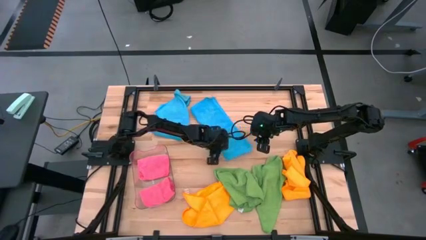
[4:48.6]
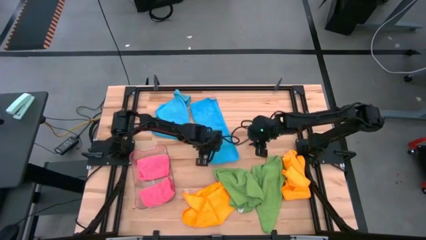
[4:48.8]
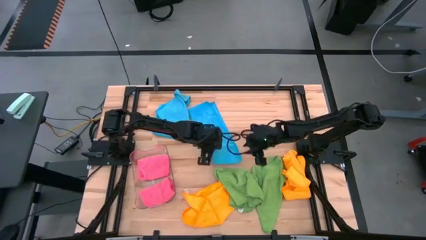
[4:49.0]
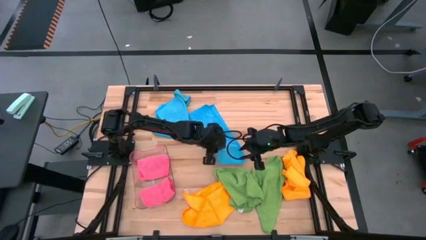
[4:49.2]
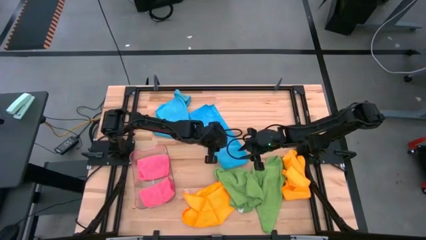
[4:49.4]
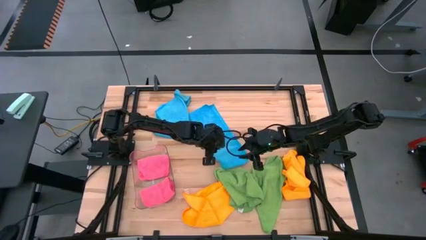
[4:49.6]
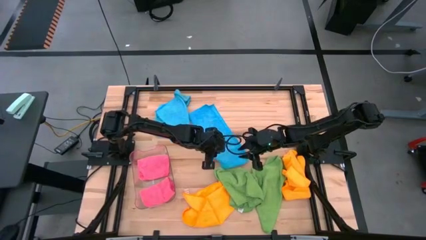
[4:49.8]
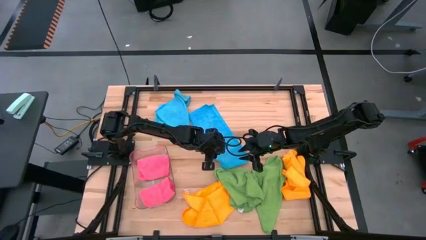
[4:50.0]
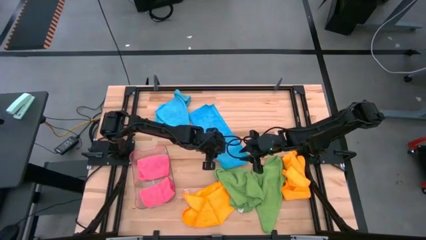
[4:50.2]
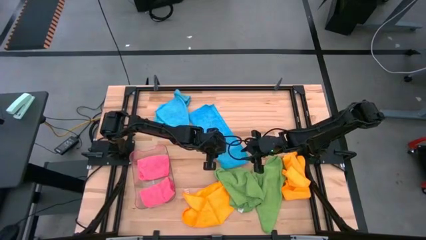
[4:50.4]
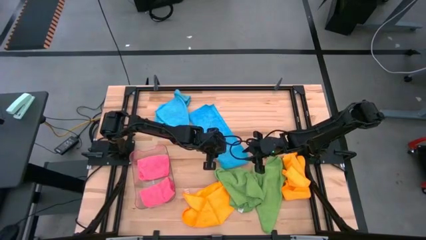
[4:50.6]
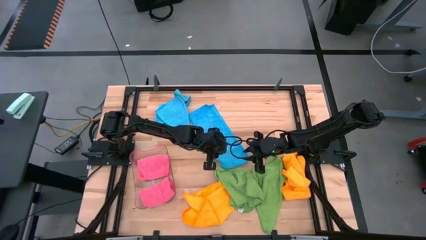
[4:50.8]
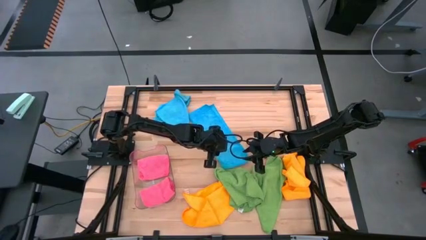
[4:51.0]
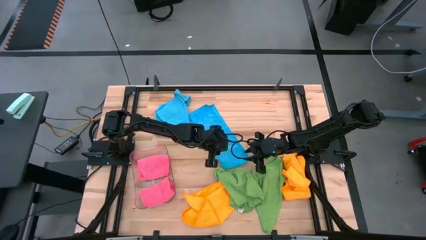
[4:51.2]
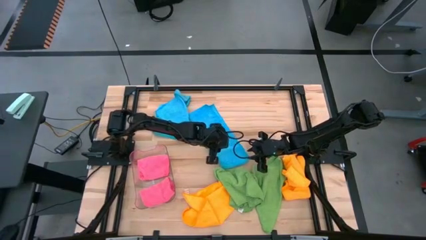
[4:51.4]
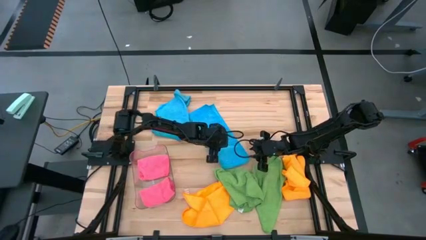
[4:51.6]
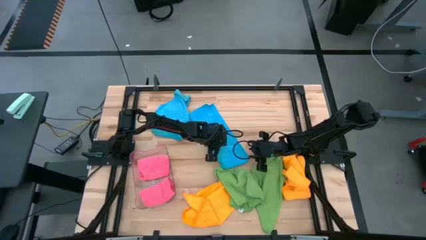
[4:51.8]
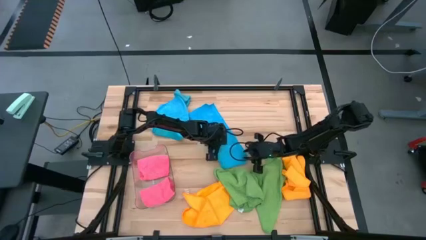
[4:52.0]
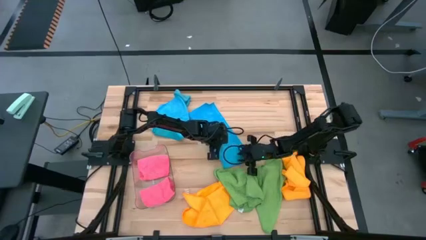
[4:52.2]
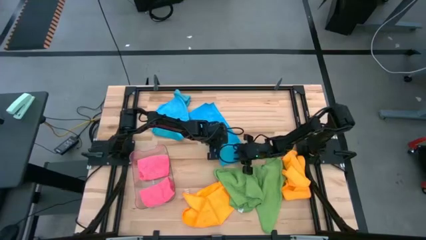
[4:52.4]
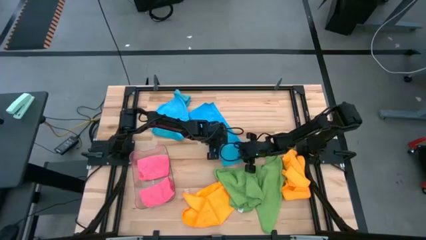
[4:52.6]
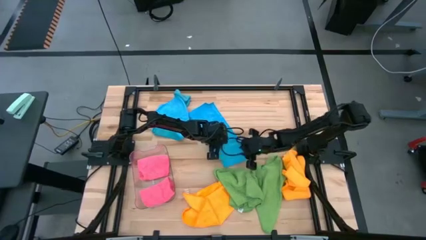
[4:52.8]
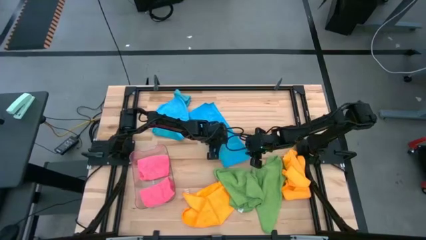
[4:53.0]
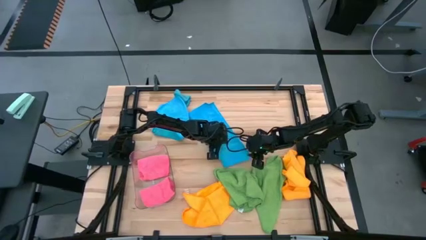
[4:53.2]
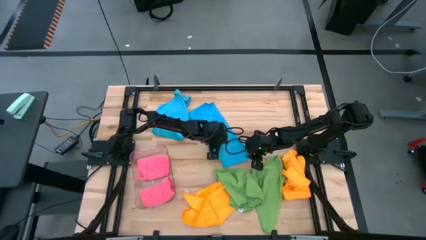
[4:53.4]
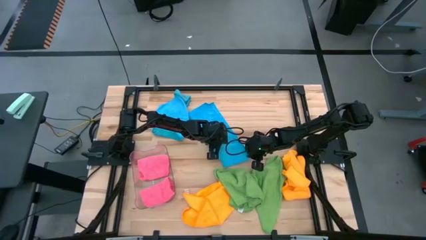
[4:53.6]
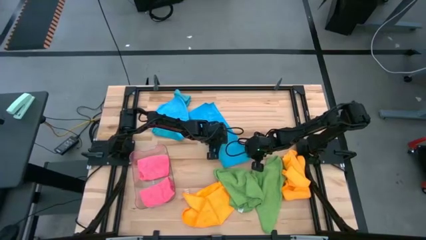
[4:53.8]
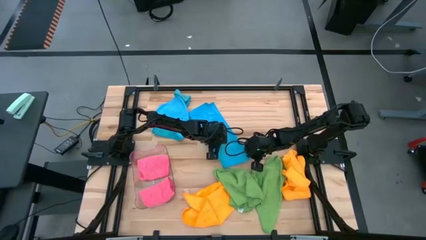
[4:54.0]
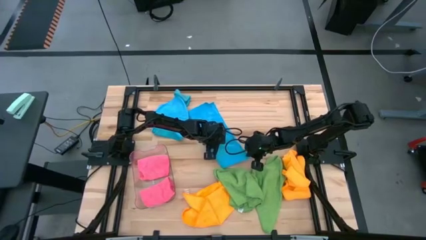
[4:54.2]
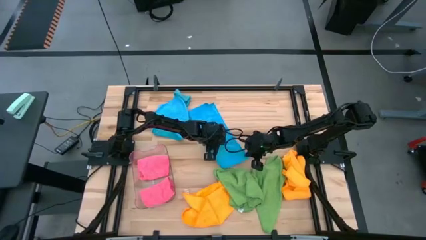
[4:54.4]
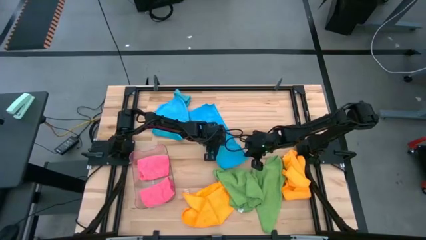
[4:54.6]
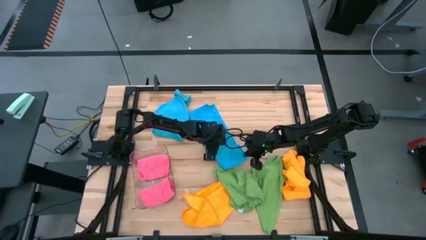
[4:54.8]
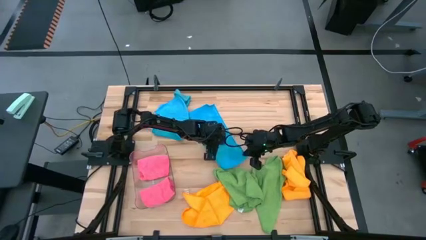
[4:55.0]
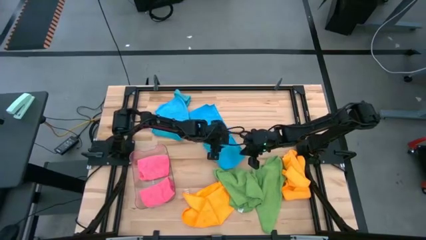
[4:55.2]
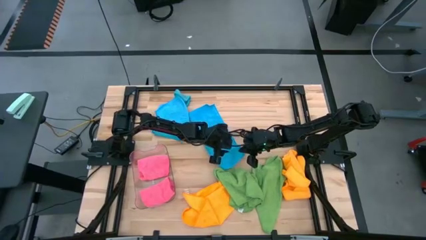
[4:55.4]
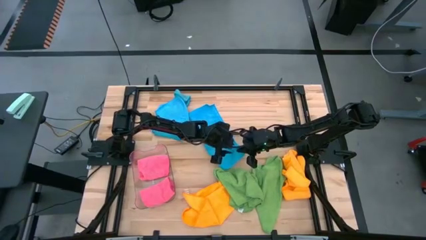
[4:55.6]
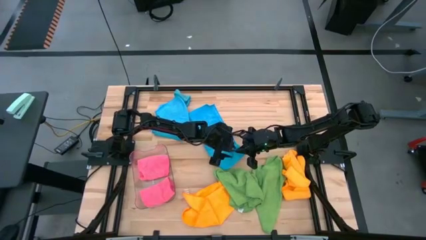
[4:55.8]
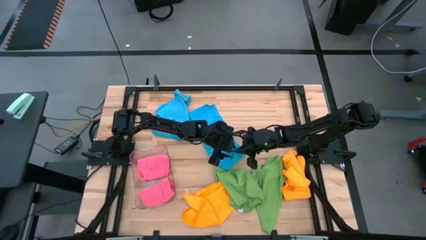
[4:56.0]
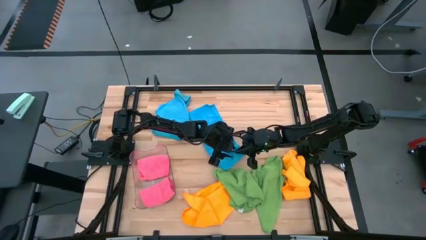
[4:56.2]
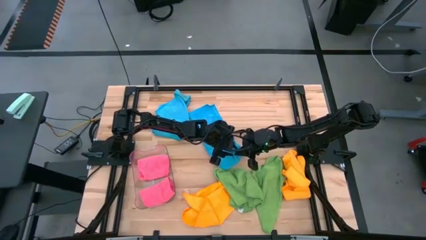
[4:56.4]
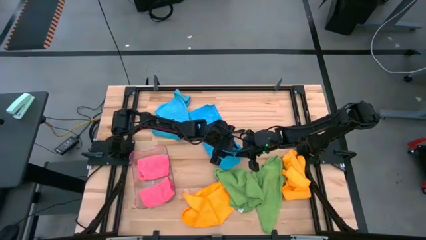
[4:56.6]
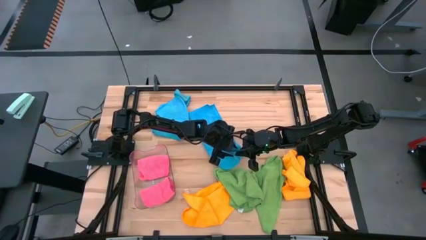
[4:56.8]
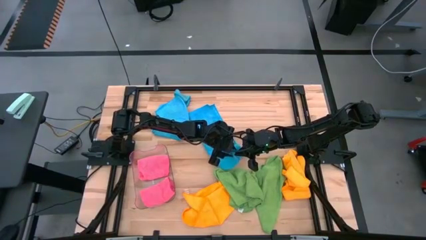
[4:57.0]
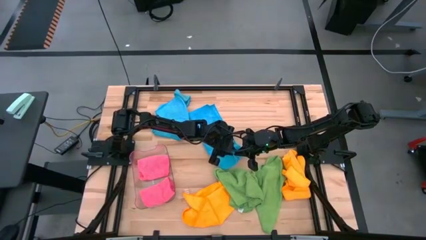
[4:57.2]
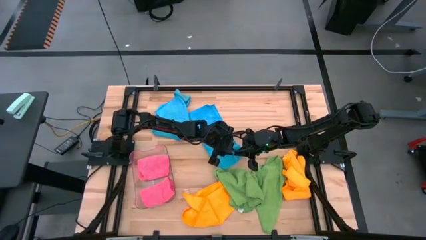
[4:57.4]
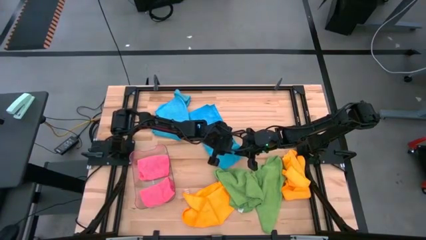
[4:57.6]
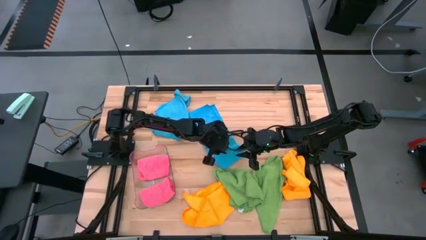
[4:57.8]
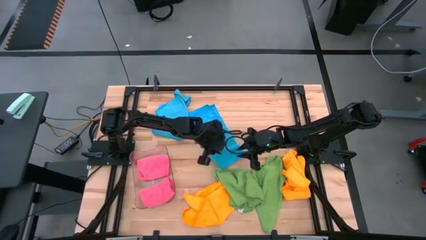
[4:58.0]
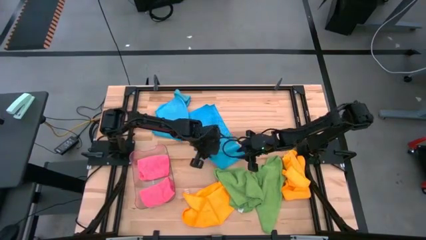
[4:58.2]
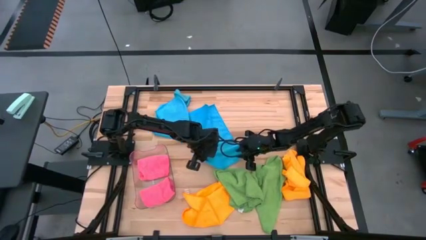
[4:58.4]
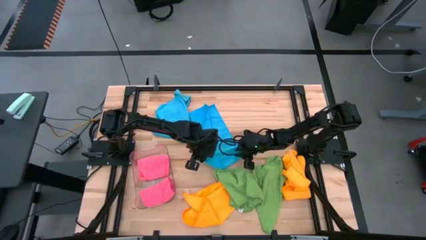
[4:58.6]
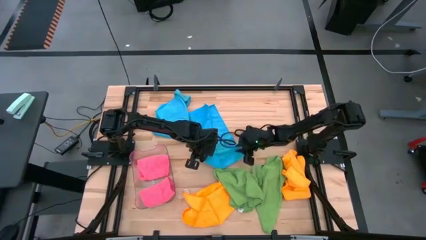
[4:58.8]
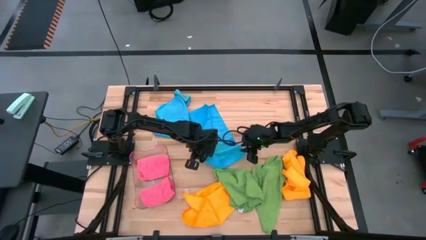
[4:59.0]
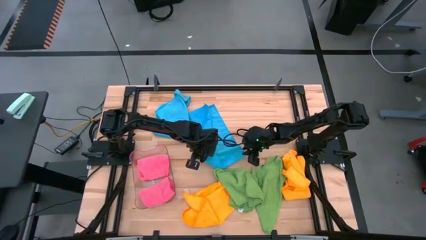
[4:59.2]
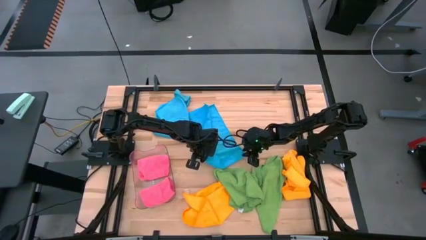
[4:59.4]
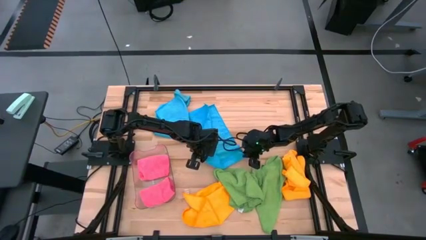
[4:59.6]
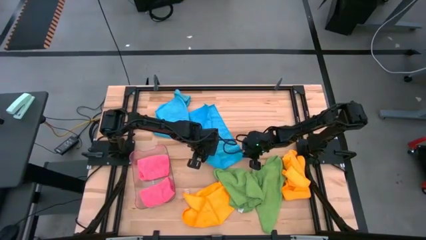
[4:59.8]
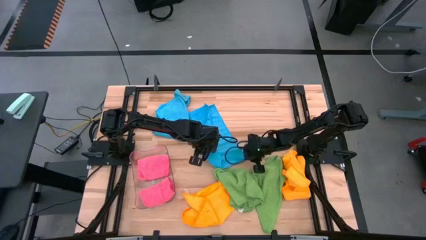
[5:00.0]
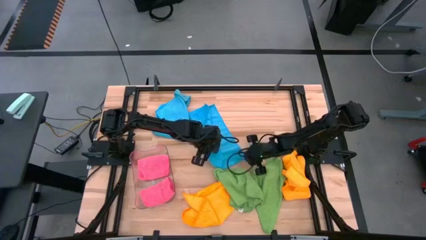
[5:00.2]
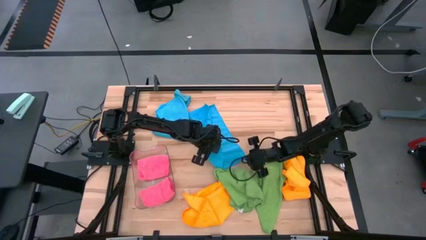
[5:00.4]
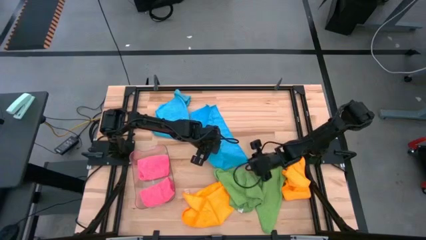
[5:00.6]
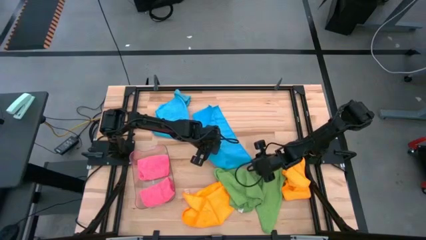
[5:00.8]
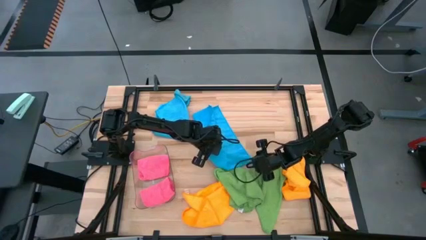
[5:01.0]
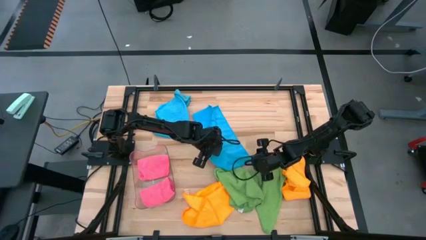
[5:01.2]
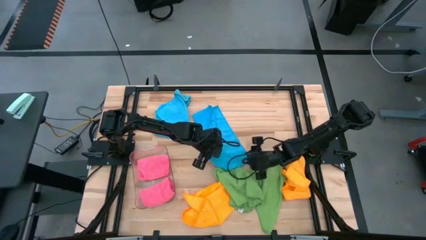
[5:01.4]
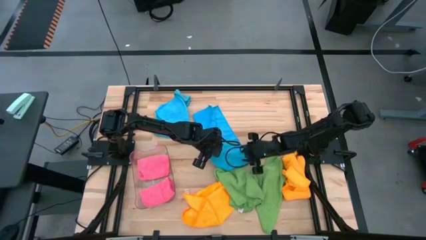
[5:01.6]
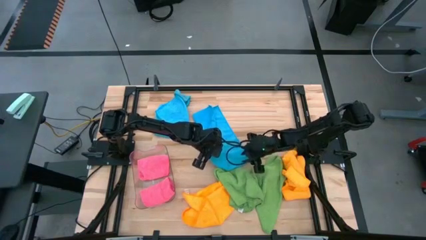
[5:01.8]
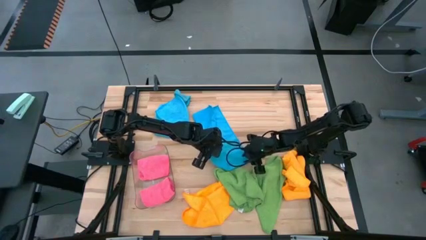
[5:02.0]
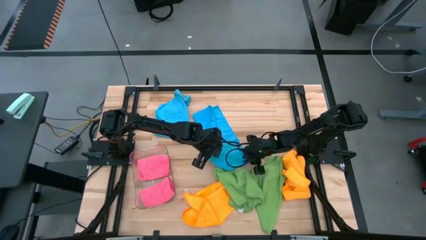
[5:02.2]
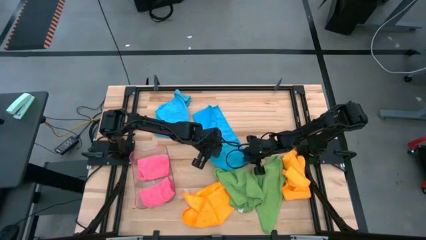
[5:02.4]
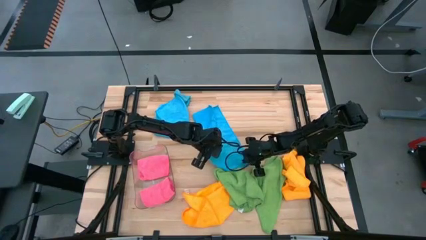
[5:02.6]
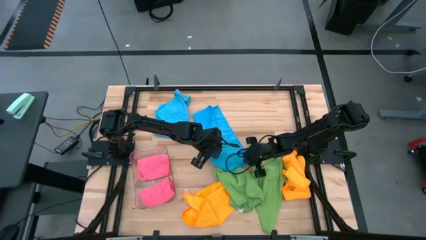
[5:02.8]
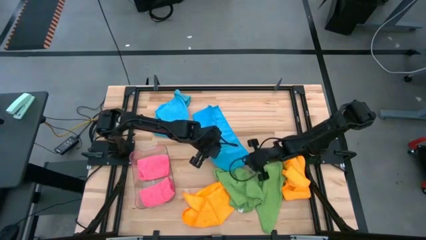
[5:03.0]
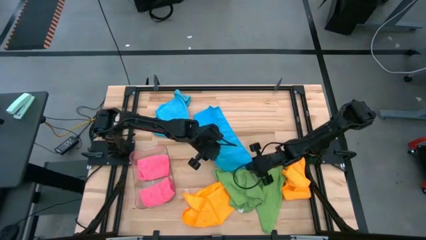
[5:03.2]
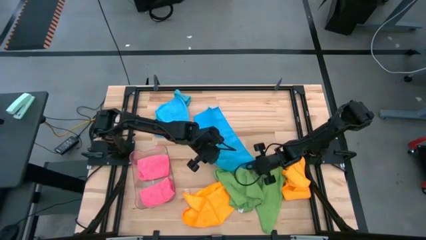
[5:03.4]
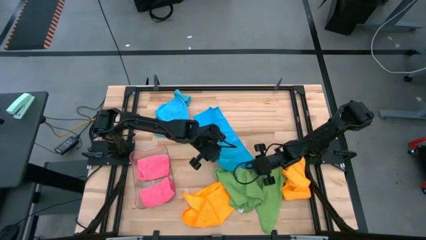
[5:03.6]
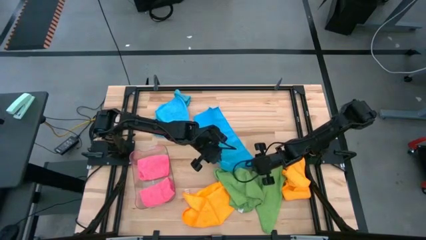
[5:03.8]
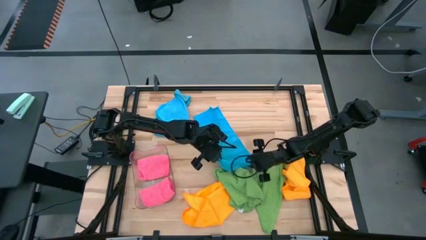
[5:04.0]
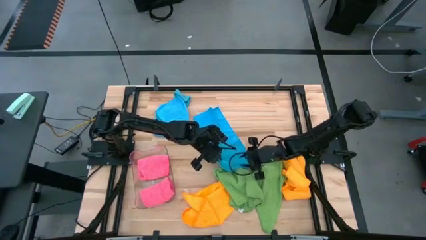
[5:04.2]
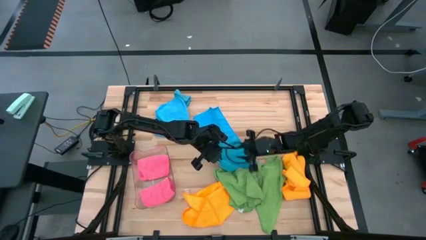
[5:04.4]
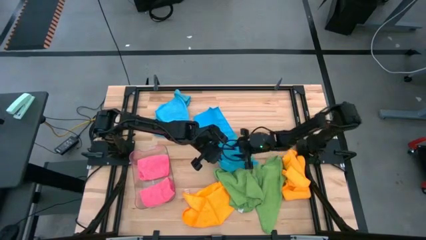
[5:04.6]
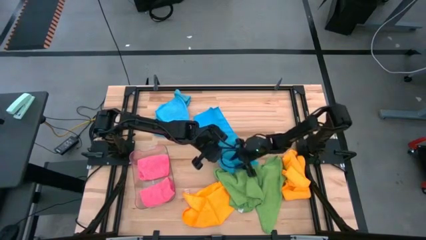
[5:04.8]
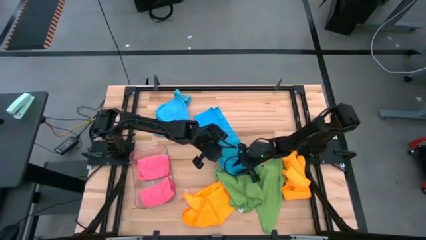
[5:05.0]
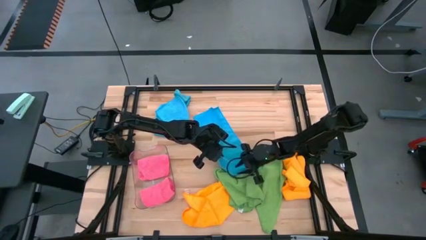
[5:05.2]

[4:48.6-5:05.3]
Task: Fold microfiber towels
Fold the bottom blue microfiber cloth
